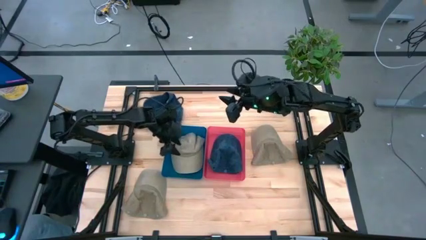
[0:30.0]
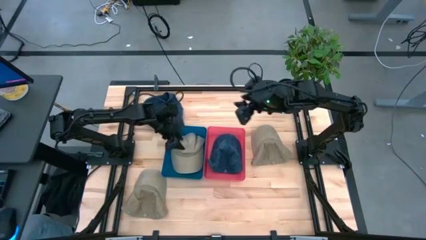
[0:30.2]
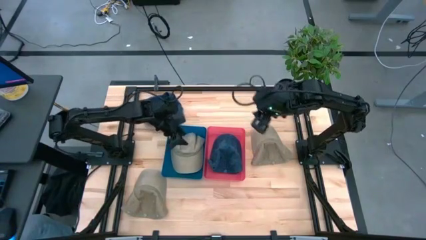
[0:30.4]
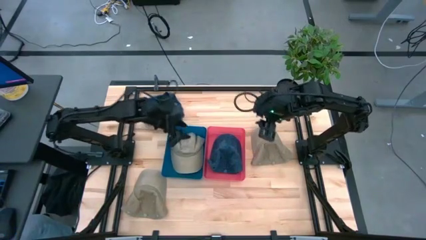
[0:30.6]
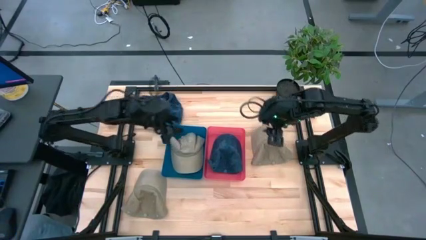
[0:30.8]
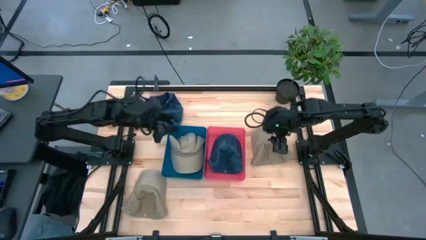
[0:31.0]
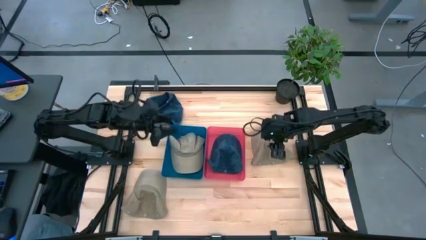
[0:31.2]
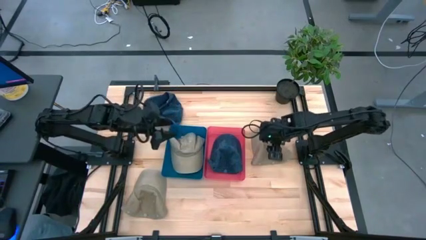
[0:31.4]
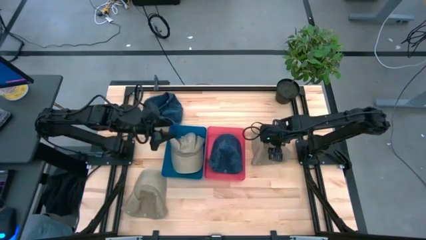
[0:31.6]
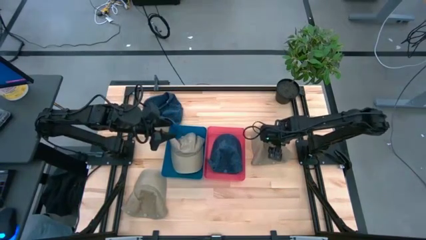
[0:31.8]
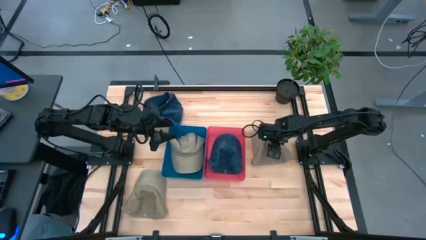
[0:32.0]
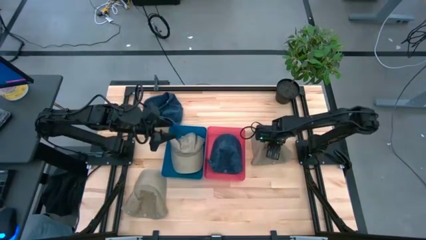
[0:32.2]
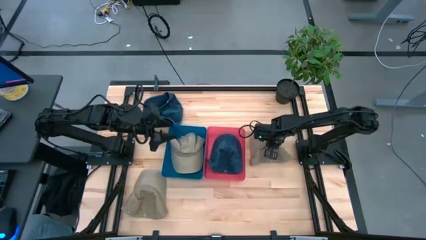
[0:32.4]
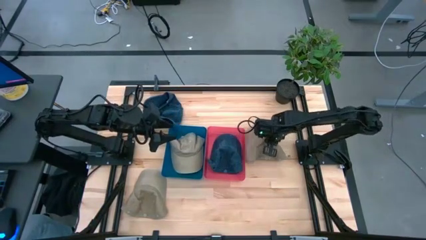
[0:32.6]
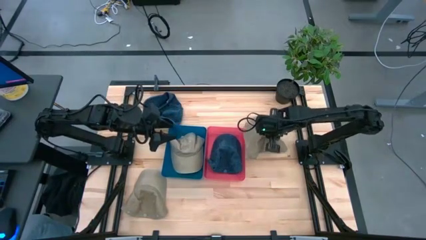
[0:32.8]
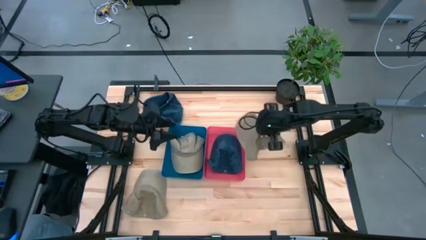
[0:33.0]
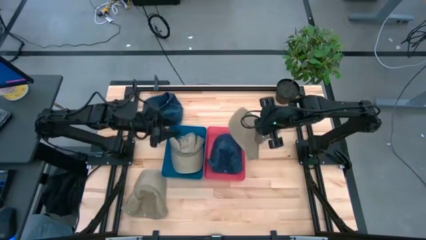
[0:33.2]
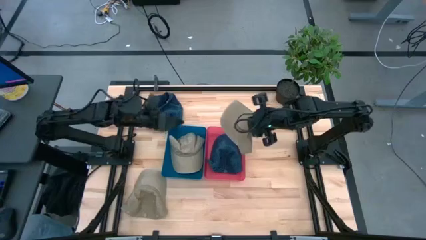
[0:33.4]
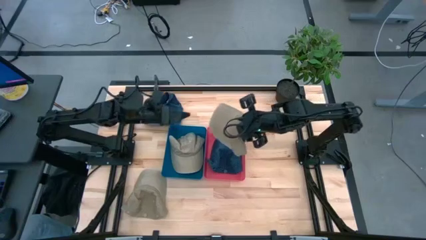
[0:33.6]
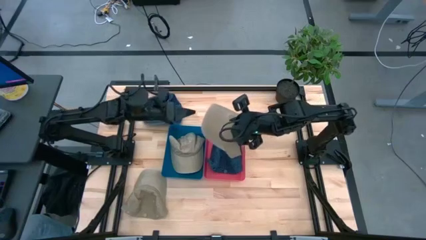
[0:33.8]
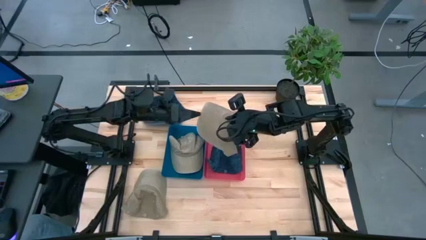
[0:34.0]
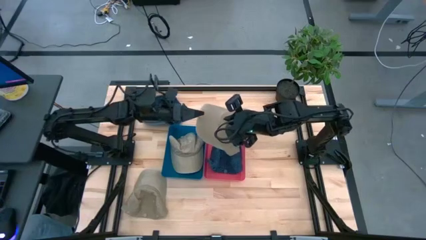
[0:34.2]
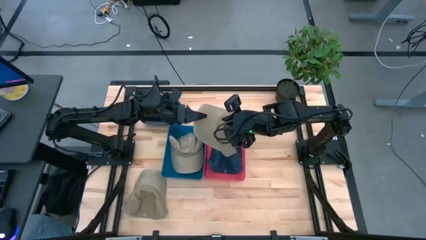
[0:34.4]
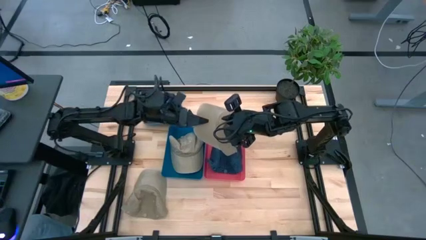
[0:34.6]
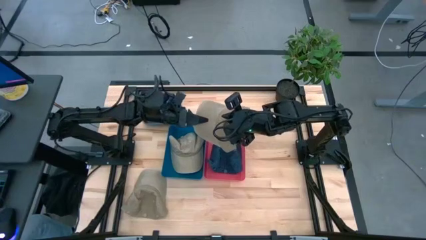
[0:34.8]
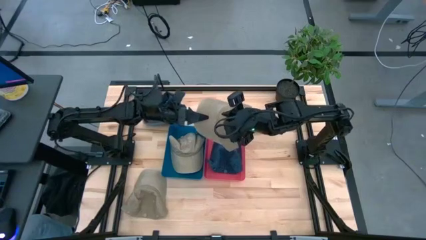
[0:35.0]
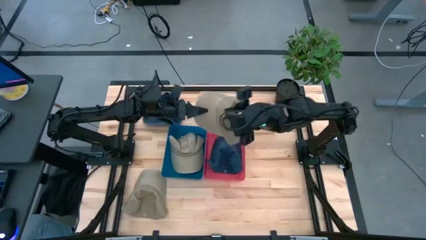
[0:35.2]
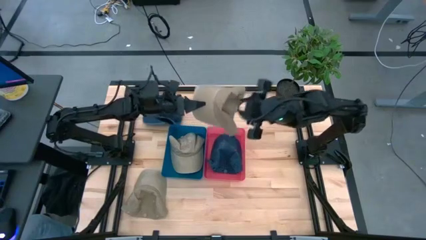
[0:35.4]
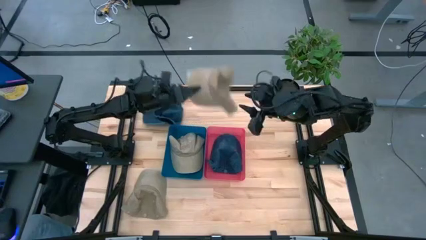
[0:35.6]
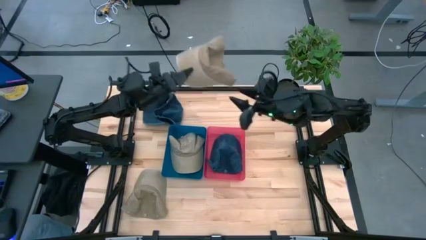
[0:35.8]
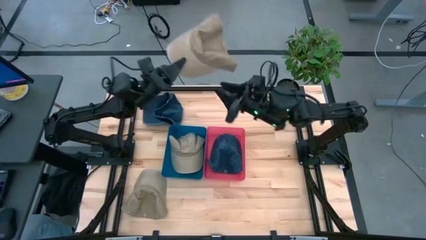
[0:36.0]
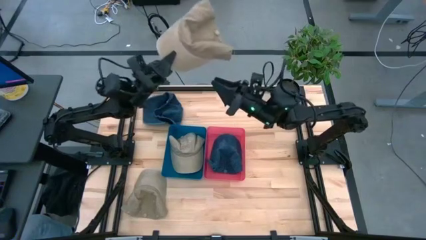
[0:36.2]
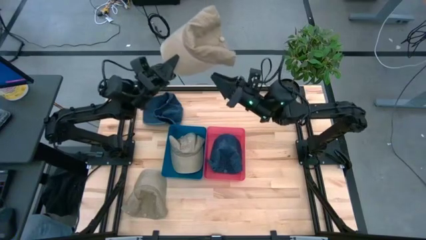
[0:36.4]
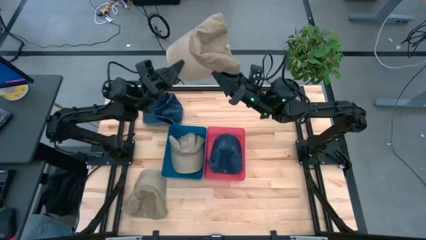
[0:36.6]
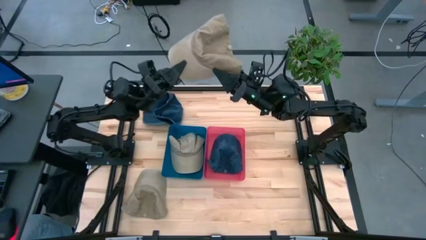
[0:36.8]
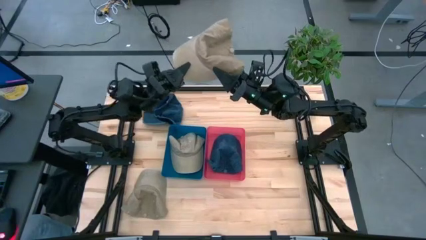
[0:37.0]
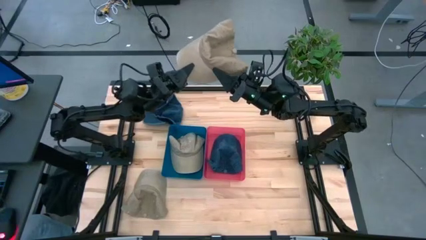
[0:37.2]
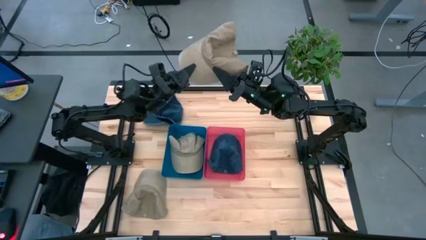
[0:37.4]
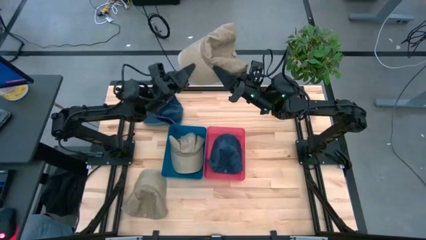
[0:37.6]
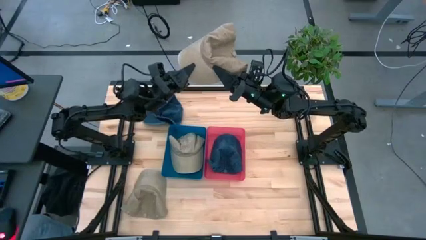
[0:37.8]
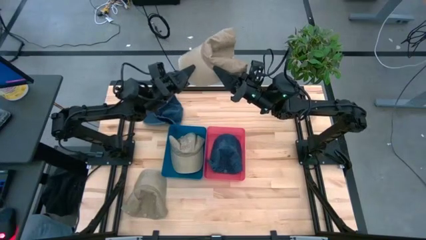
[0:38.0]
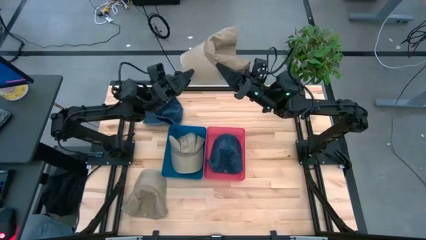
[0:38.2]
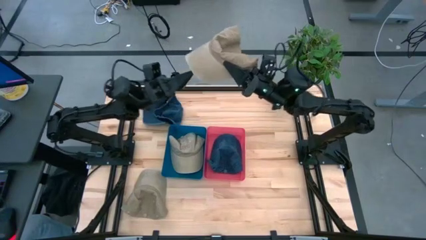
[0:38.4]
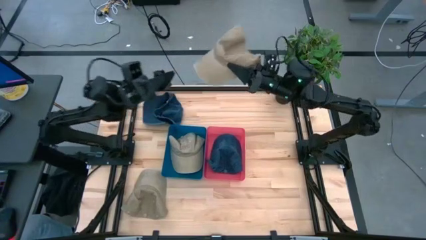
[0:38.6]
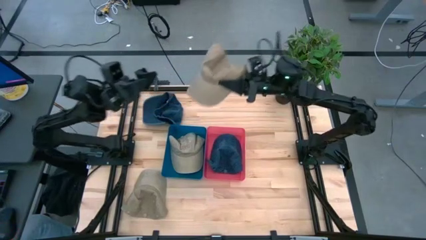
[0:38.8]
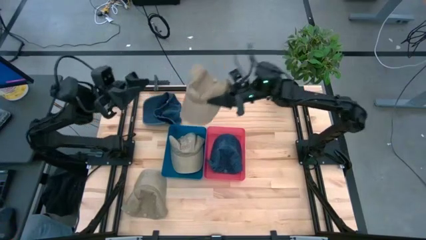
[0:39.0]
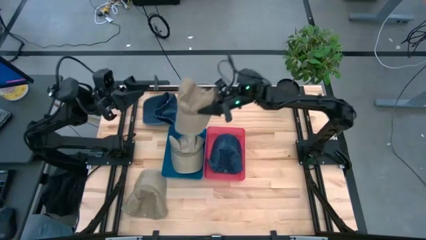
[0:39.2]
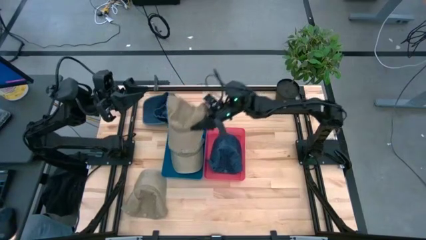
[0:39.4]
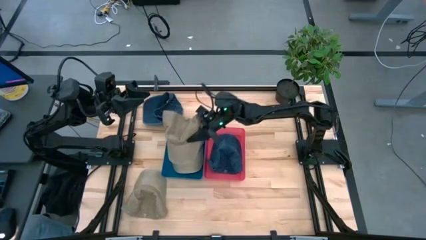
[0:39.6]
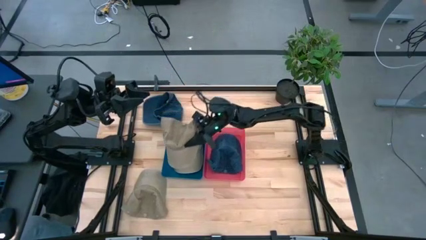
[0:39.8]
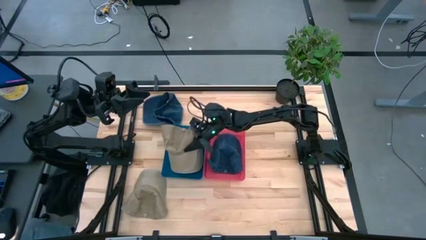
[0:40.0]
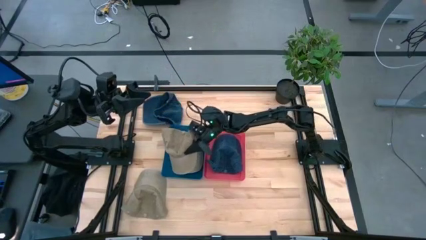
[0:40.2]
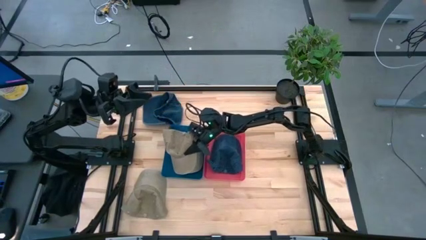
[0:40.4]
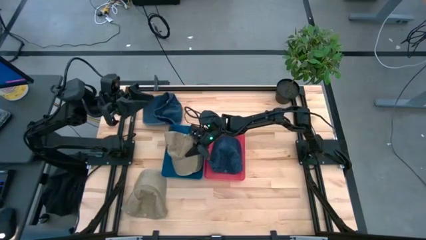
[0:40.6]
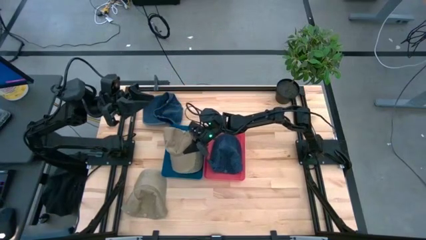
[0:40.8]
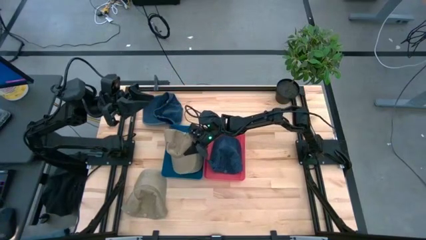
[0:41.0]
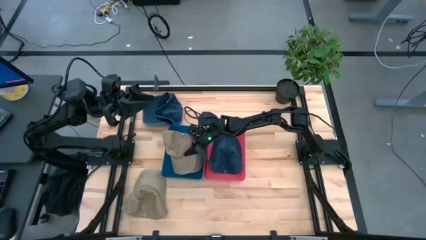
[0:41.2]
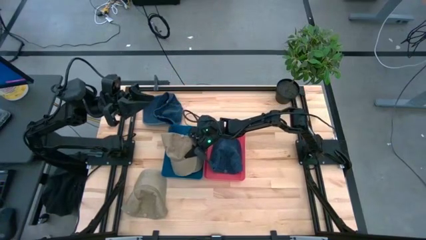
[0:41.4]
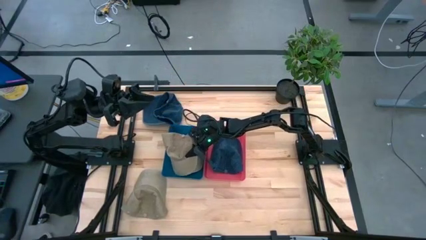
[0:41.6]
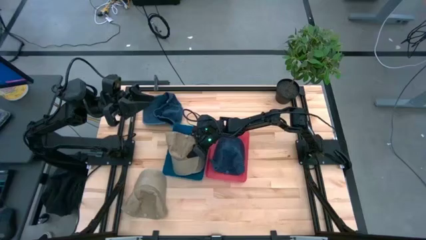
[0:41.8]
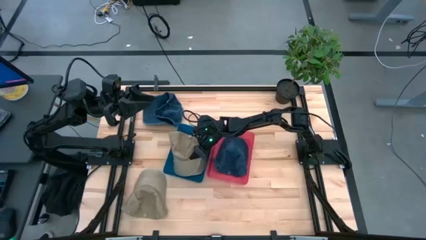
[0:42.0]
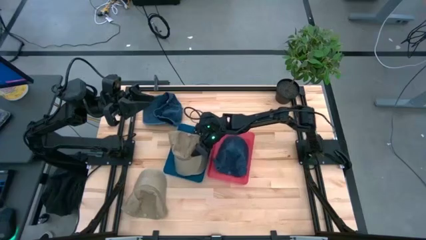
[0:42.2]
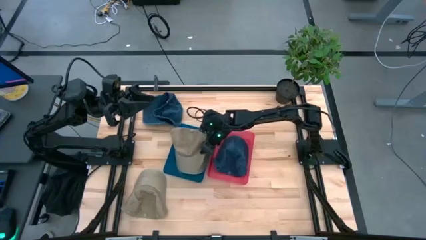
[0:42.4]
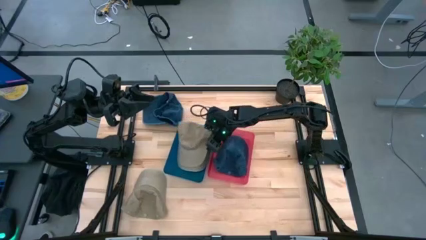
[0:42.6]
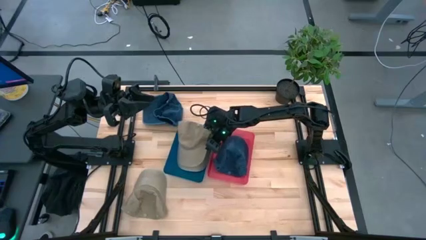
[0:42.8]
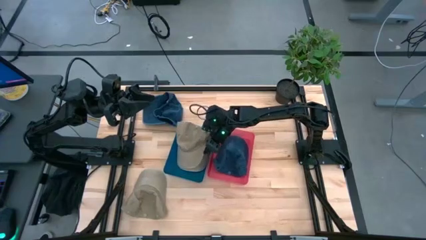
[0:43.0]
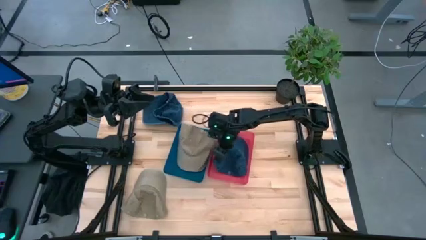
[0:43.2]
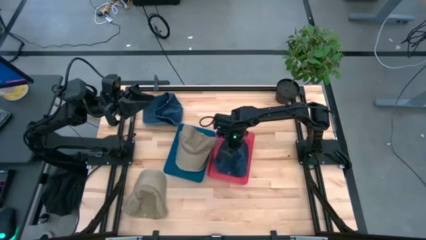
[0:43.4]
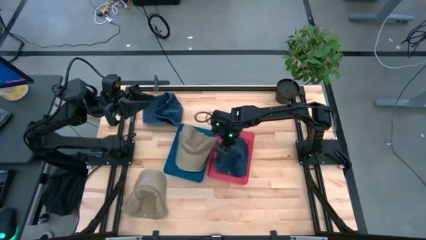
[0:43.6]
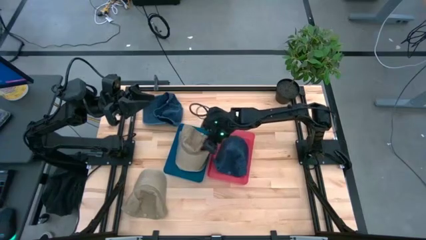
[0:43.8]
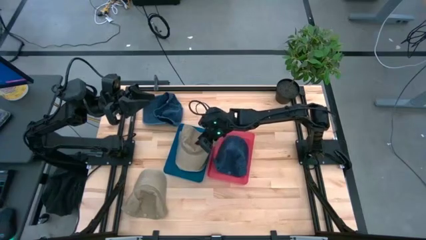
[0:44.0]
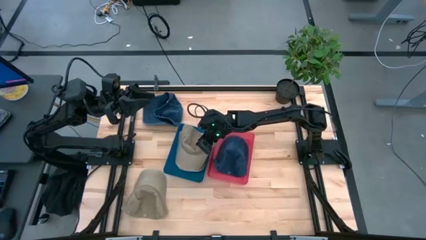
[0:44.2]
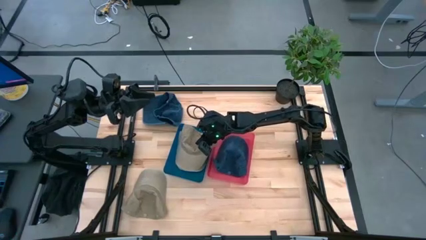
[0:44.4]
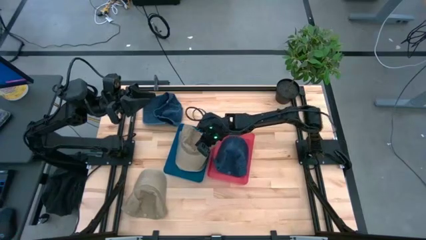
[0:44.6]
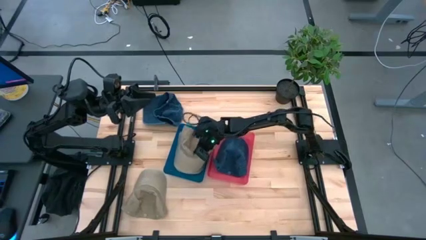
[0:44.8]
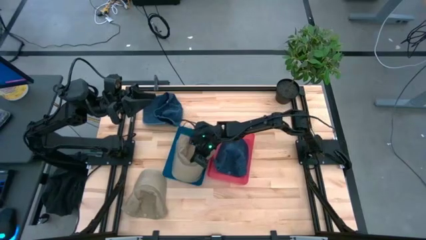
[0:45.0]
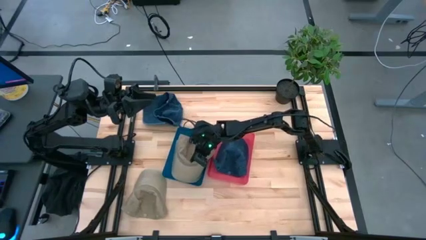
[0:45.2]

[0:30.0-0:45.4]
Task: Pick & Place hat
Put the top brown cap into the blue bin
